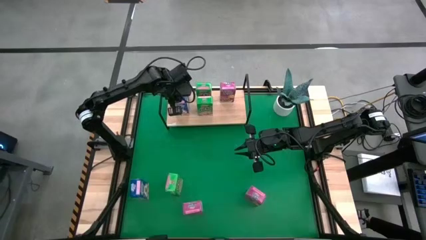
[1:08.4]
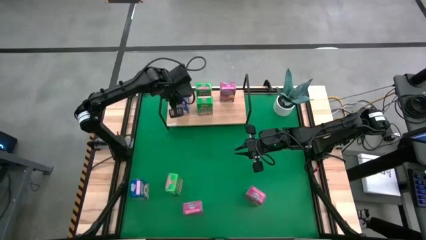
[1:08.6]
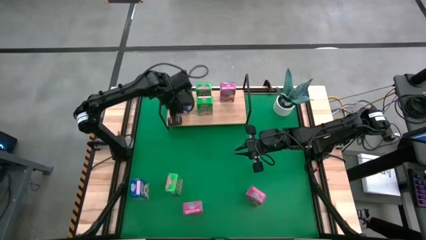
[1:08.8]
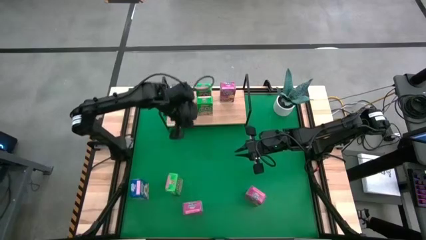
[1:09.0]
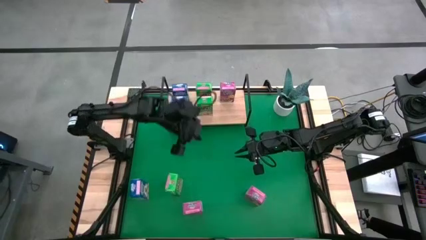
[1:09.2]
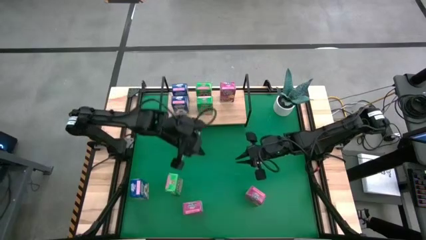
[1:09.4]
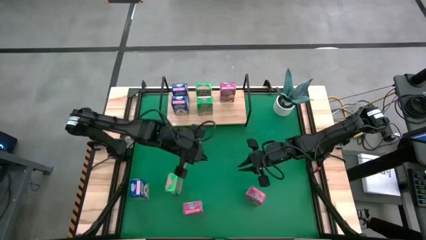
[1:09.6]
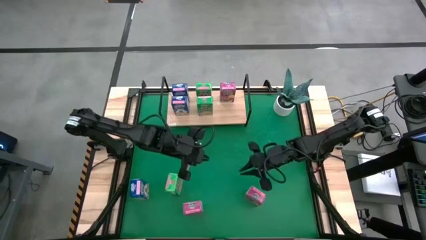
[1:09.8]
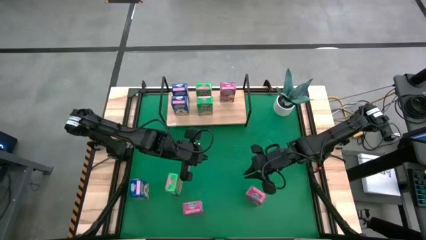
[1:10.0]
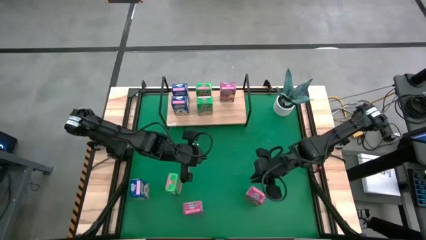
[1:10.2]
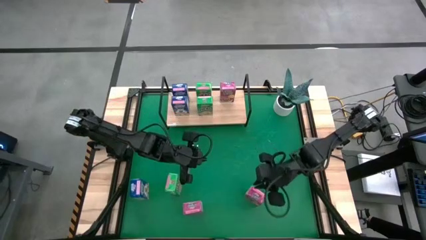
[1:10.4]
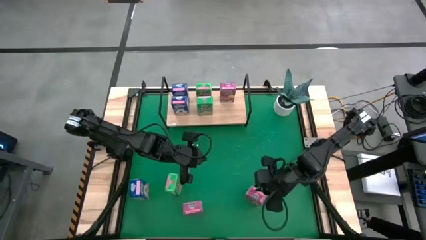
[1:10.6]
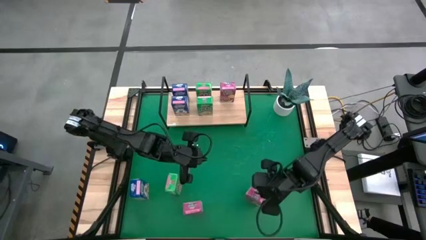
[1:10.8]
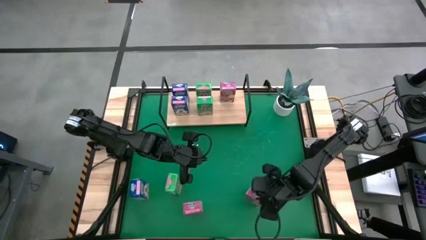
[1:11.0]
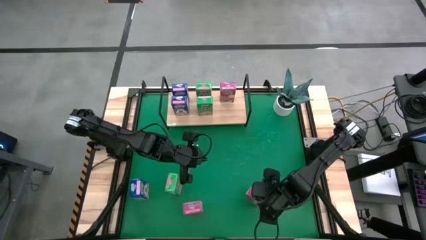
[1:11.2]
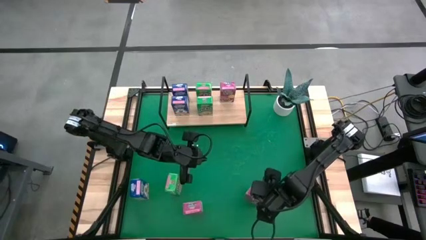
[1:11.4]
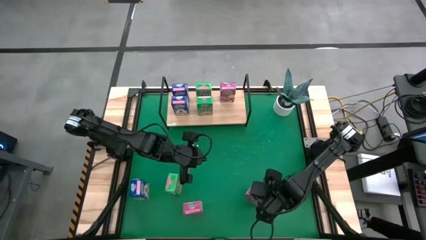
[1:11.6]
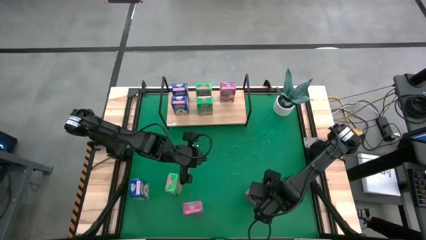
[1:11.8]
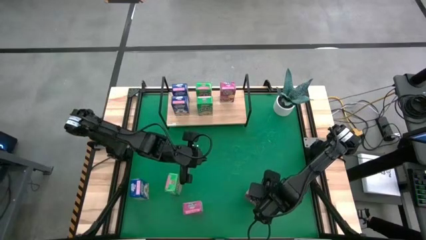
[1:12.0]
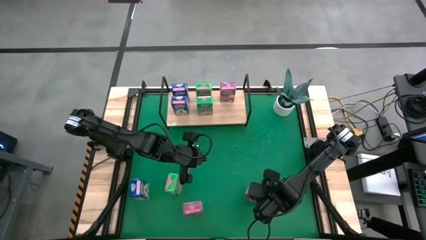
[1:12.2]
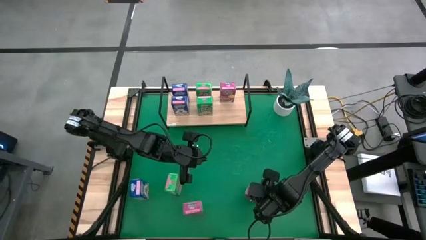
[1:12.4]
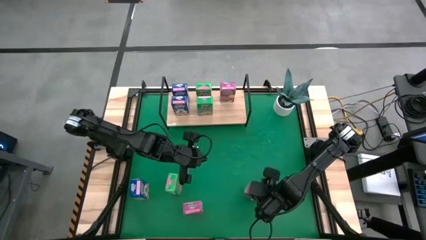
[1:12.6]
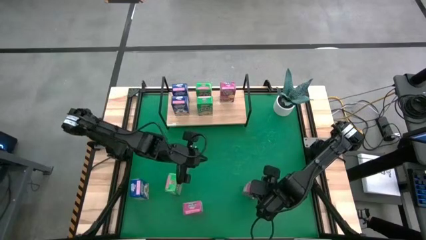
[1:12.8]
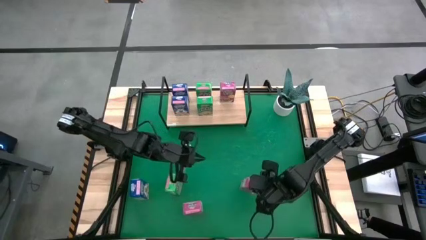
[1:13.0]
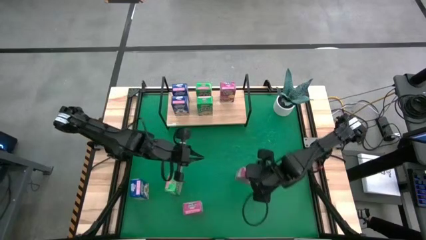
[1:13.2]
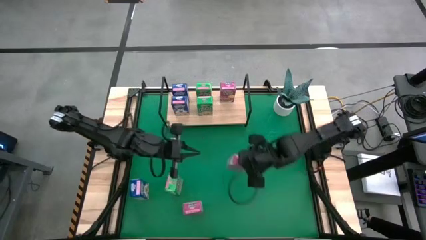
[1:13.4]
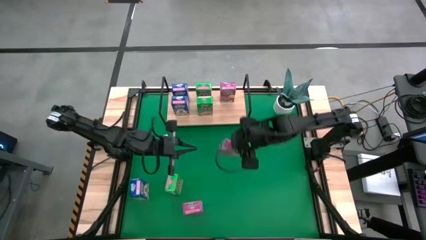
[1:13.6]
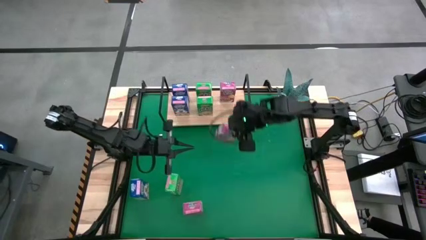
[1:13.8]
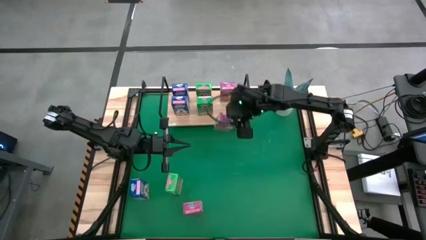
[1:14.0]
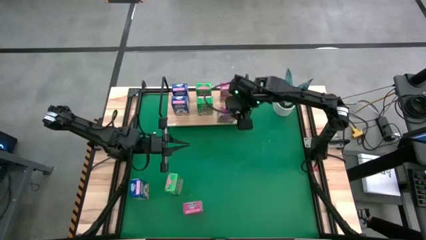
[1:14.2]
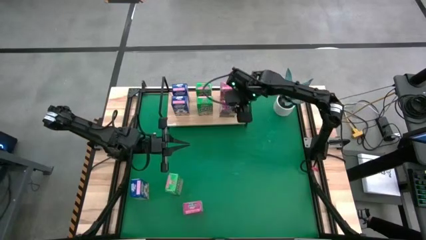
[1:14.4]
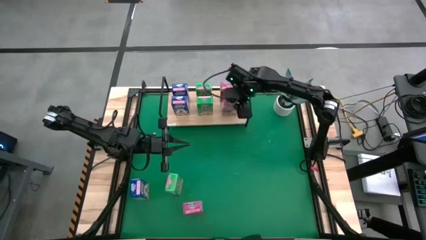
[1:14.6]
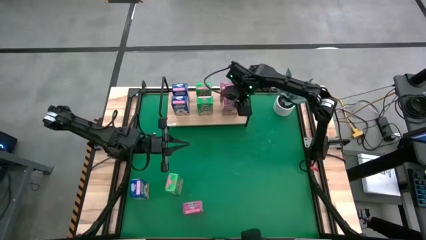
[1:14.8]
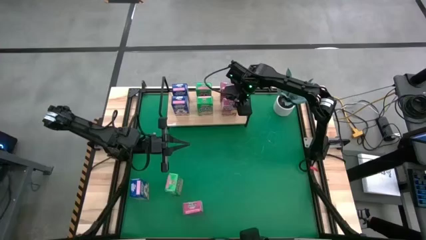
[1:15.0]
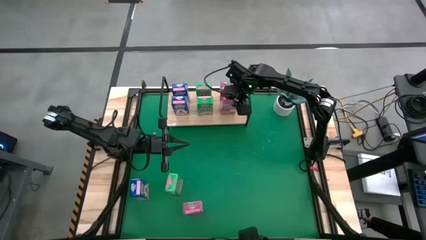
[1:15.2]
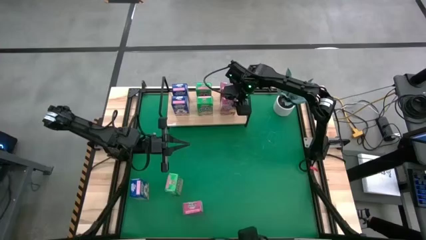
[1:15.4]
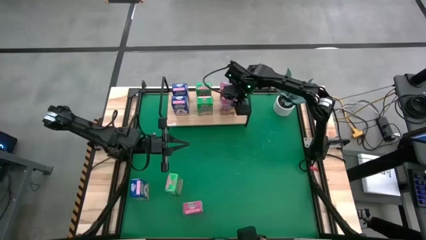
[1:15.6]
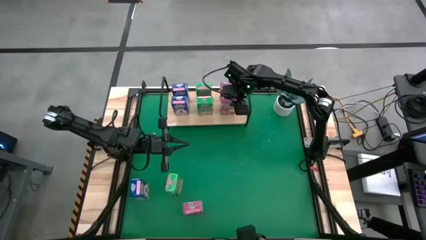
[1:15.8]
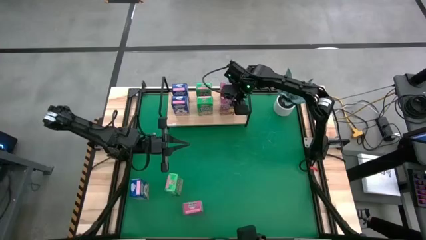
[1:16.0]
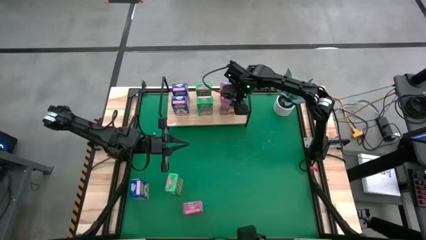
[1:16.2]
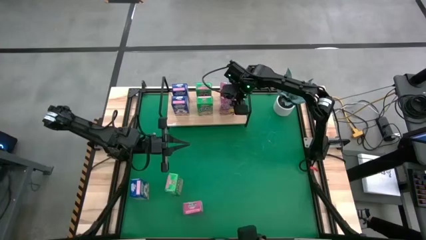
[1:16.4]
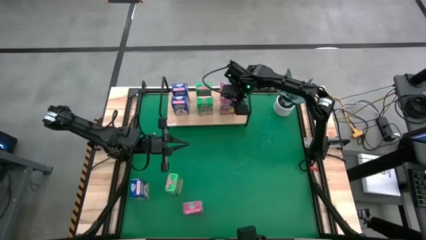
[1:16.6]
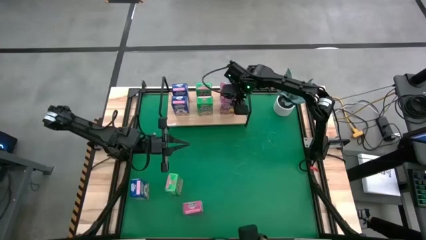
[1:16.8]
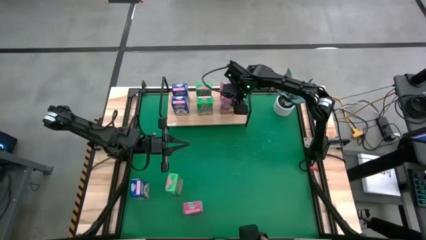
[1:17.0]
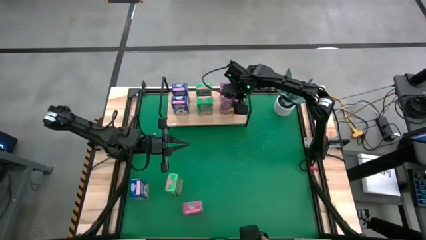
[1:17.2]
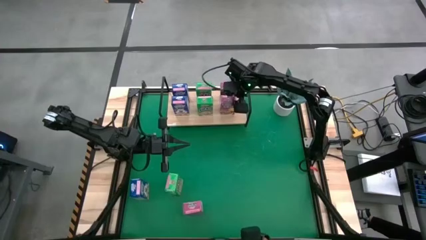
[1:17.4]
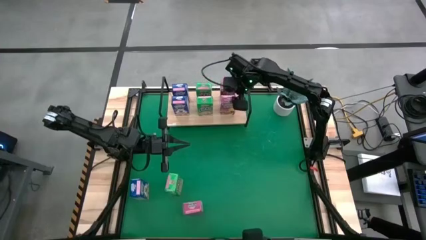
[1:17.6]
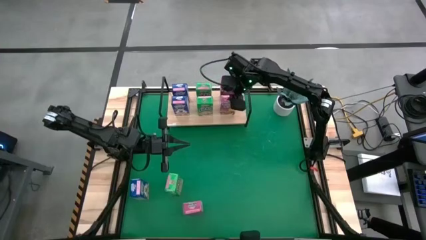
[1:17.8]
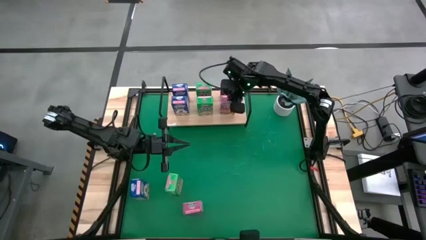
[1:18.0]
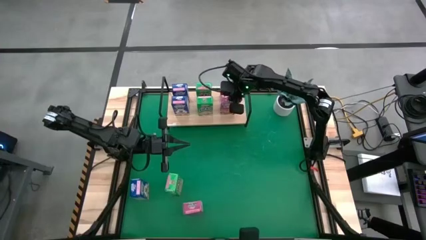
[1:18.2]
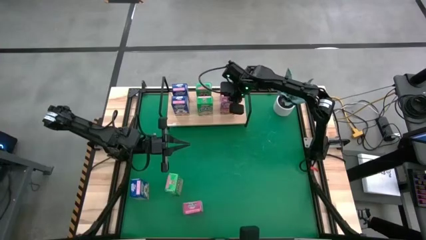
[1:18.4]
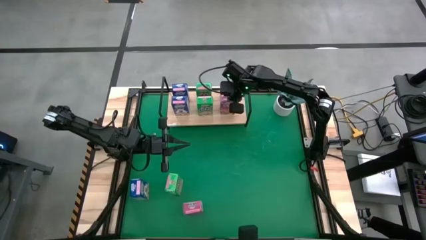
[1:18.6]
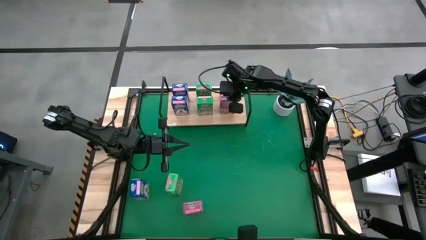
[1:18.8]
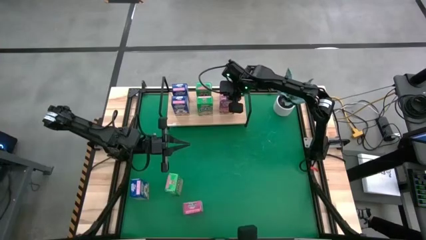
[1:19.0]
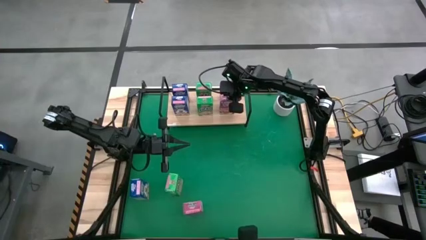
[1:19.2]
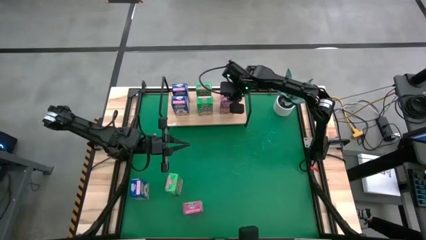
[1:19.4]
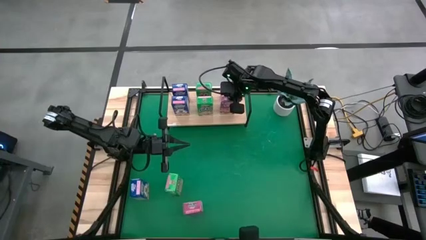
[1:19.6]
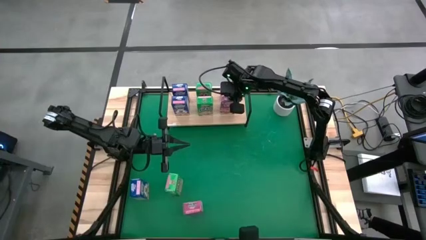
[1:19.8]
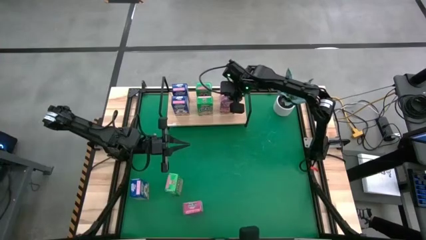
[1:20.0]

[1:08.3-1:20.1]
Task: Stack cereal on shelf
Put the right pink cereal box aligned with the other pink cereal box on the shelf
